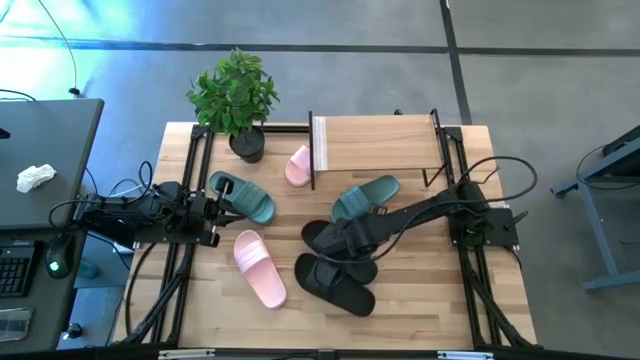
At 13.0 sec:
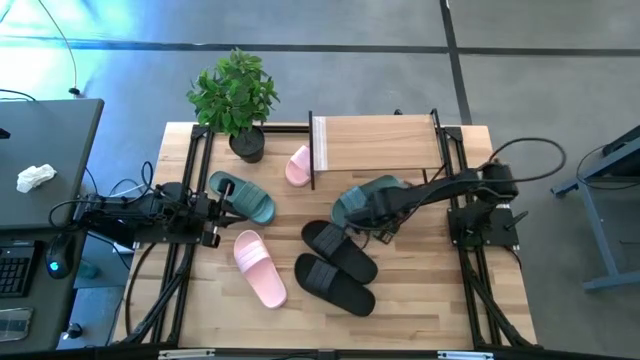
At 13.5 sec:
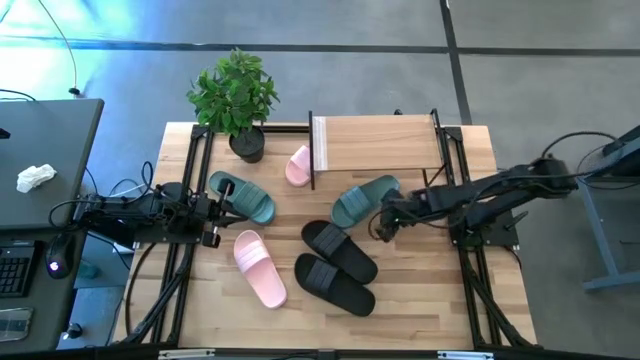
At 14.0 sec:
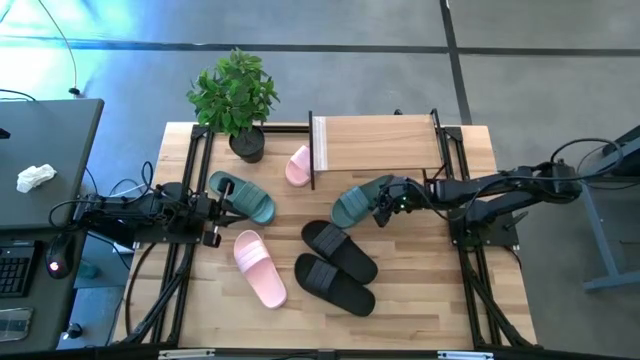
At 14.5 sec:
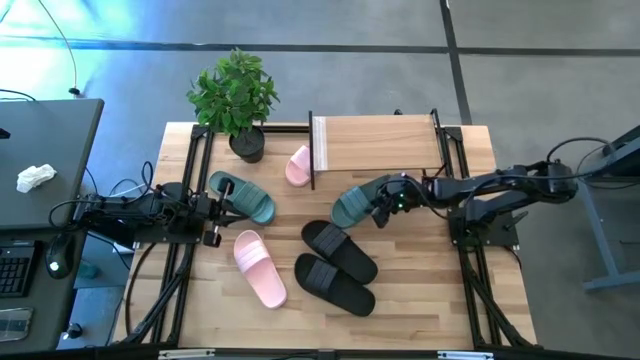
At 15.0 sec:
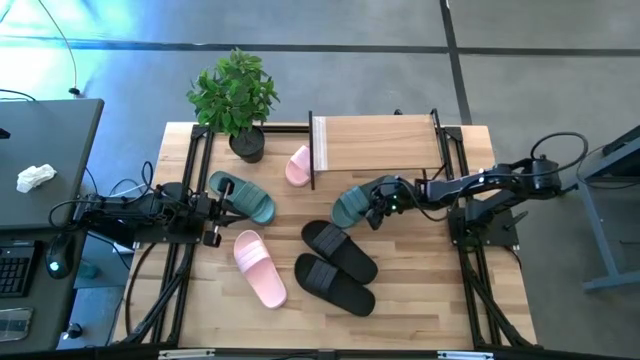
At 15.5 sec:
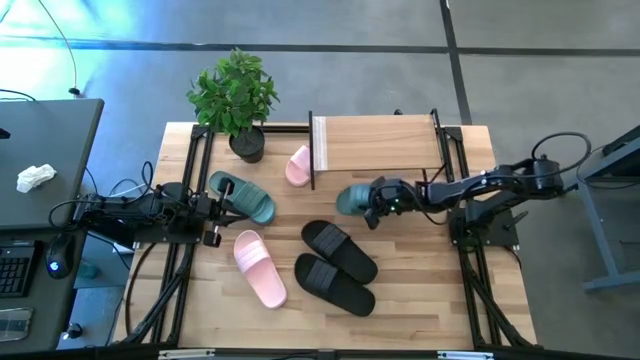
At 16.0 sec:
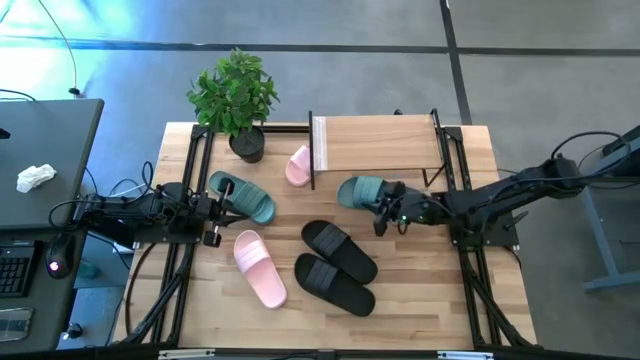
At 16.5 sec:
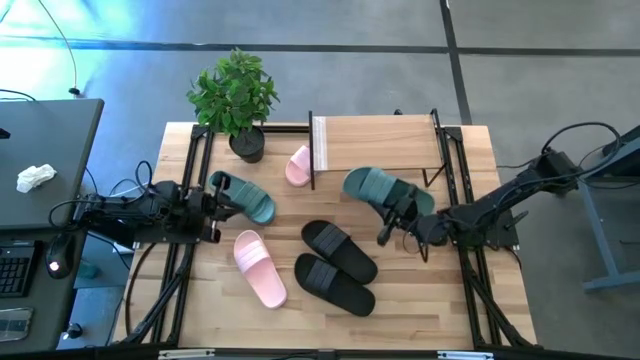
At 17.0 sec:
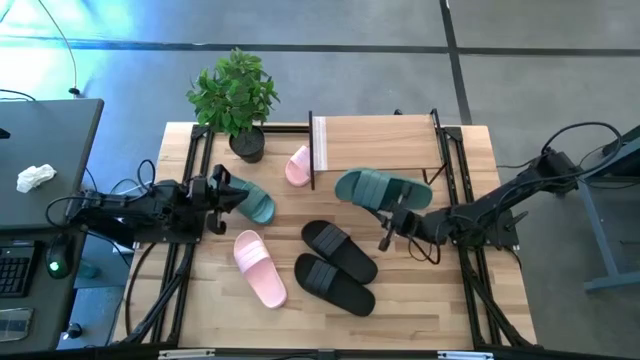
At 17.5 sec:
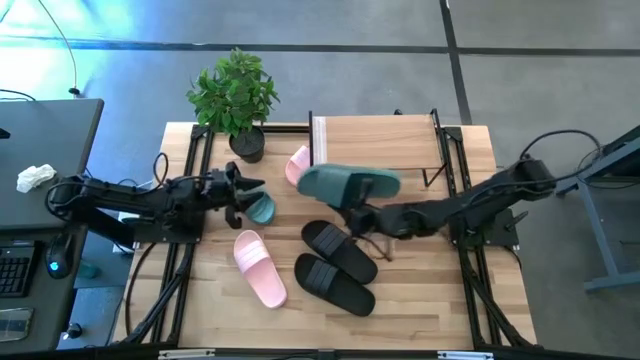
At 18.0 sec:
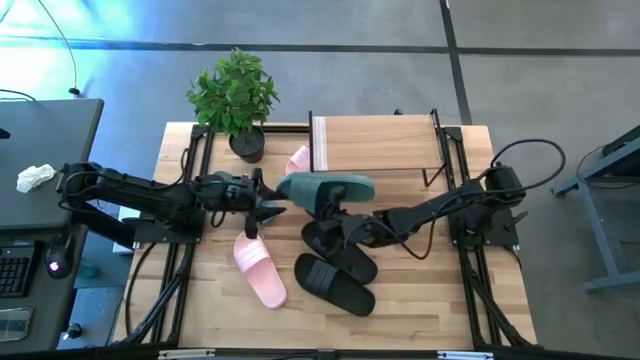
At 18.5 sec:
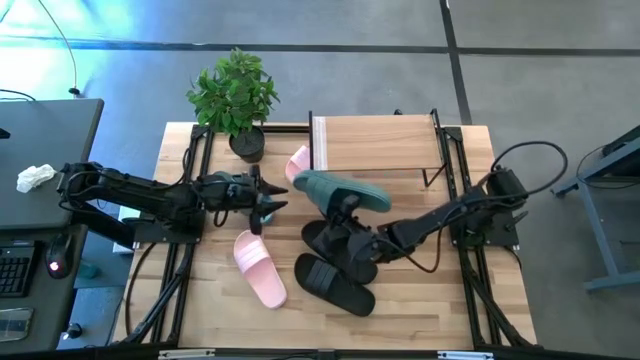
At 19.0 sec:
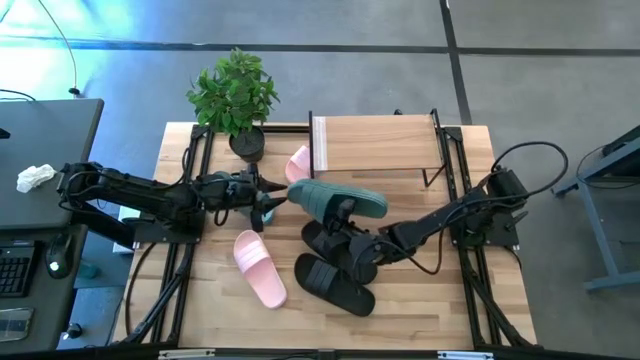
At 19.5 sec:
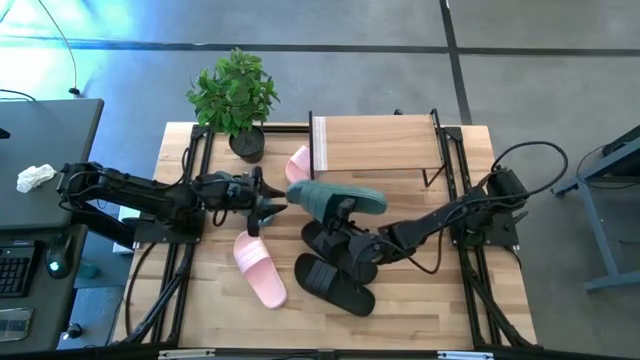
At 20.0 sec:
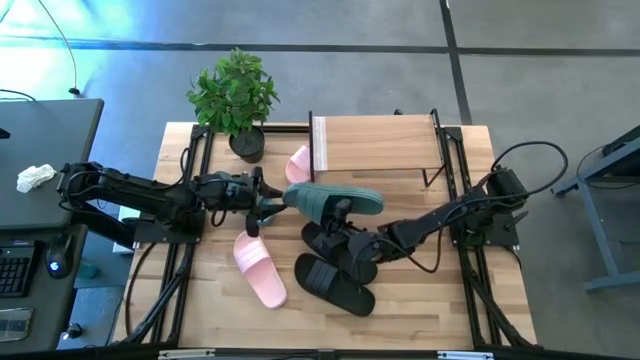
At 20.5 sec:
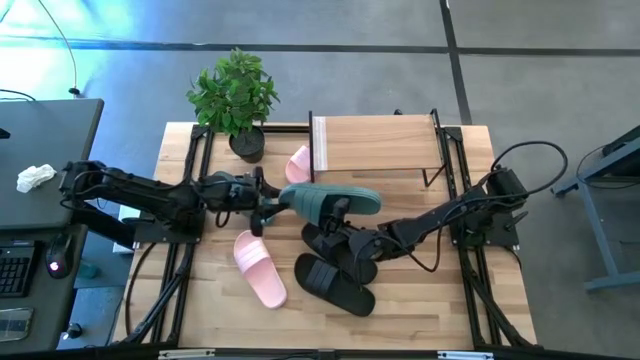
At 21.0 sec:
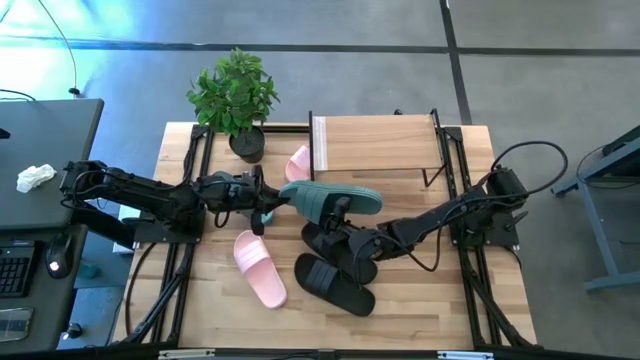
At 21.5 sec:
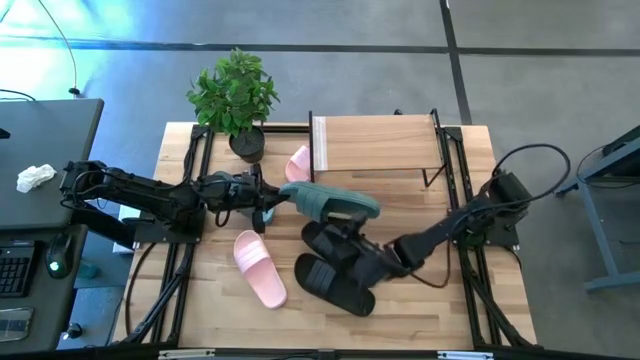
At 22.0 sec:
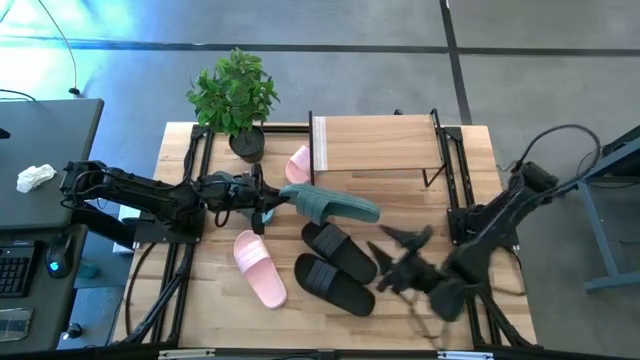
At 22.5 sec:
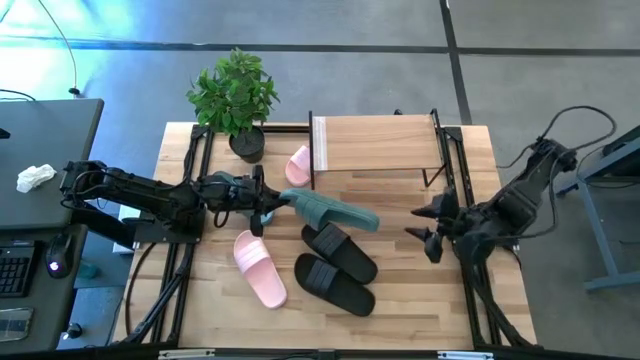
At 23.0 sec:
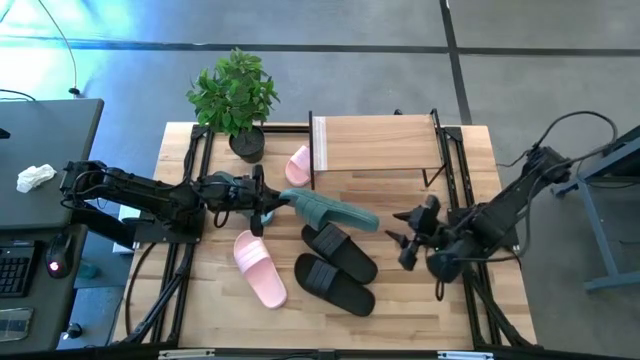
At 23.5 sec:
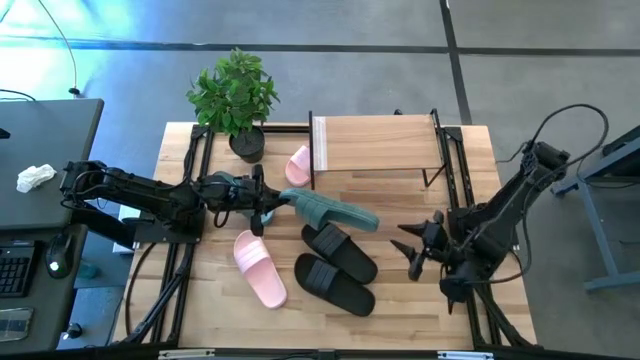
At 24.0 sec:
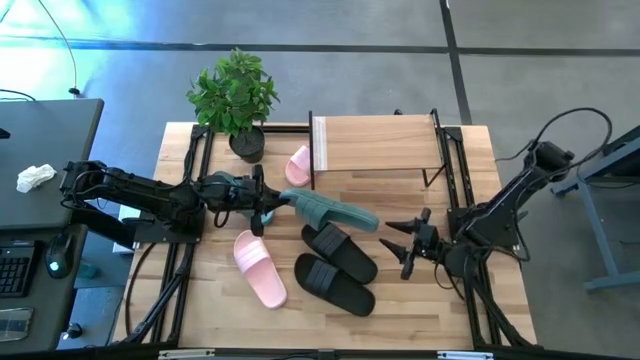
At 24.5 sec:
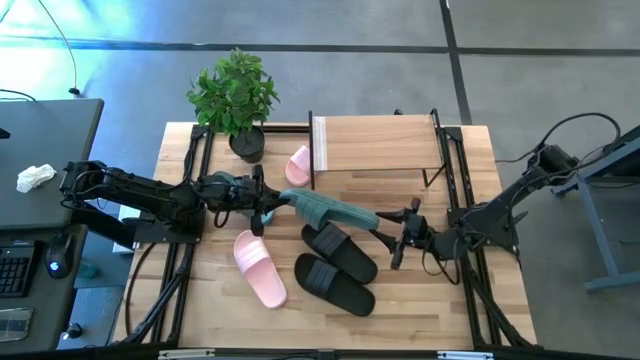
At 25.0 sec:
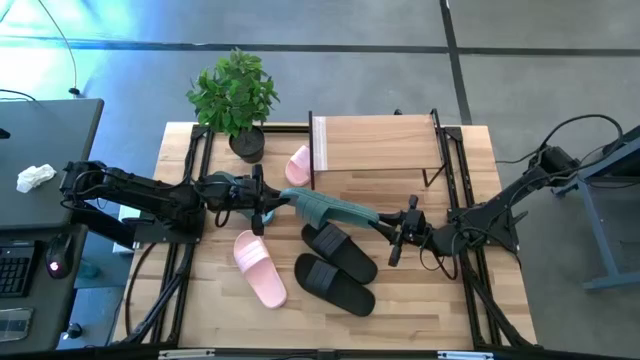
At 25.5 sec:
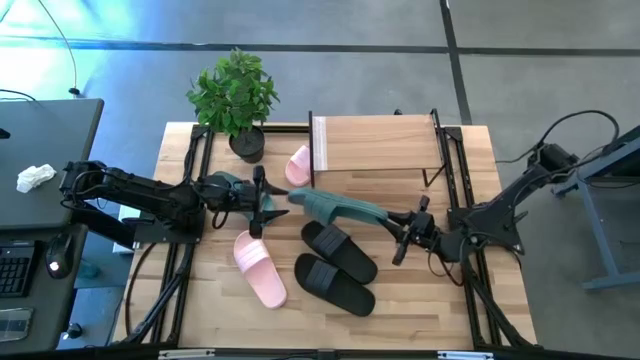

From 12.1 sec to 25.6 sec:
Task: Pick and place slides into the shelf
Put the right green slide under the shelf
